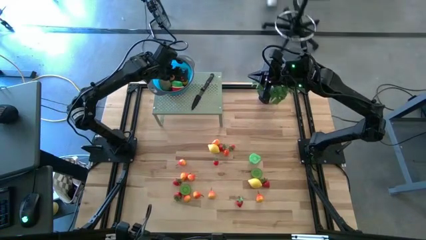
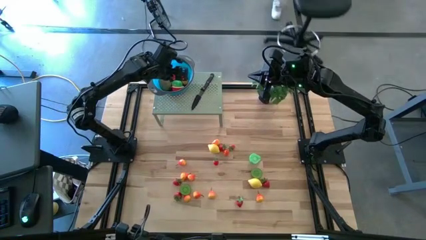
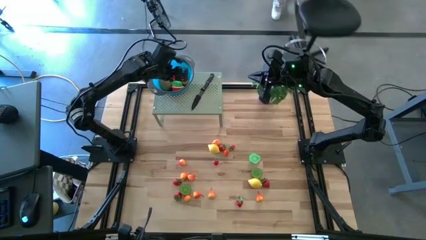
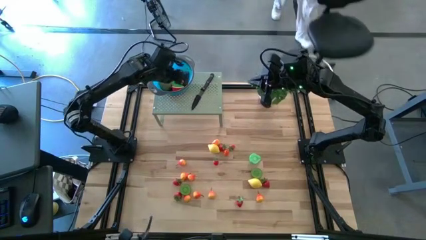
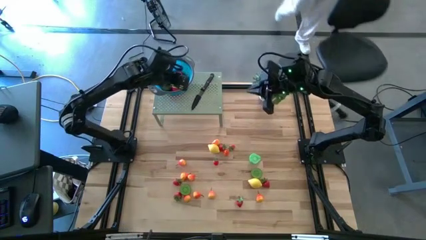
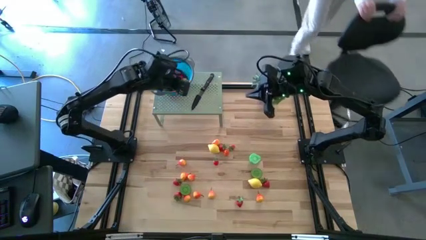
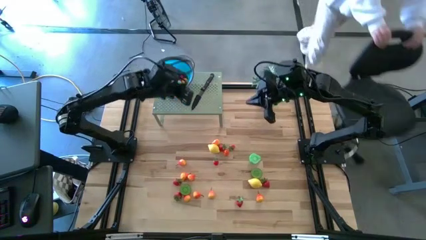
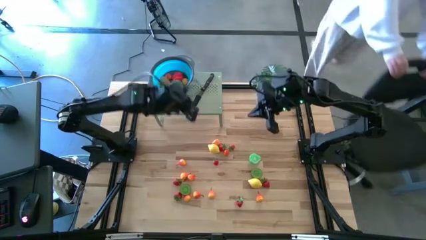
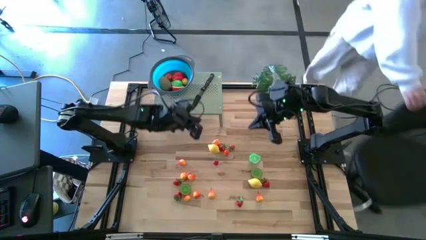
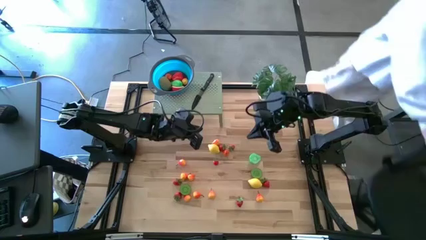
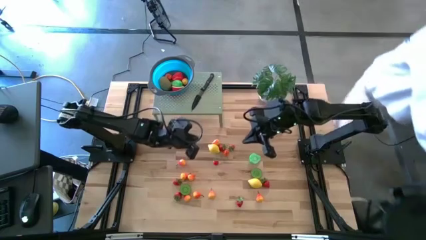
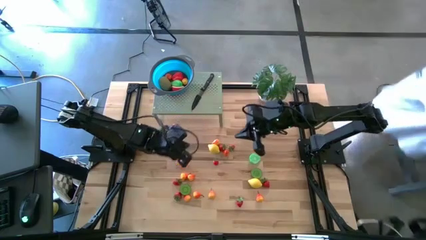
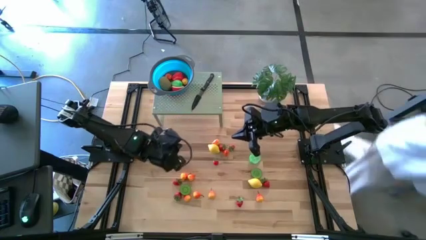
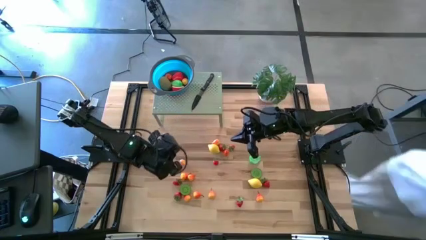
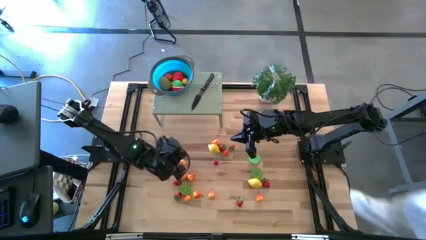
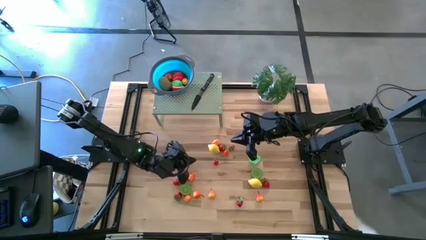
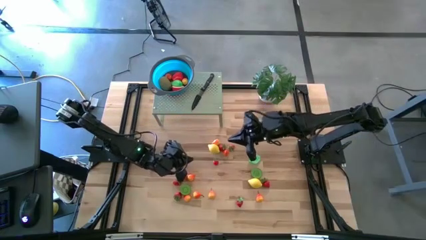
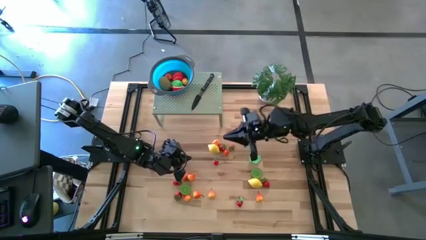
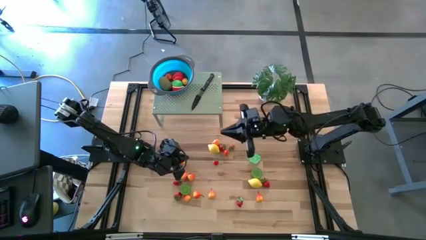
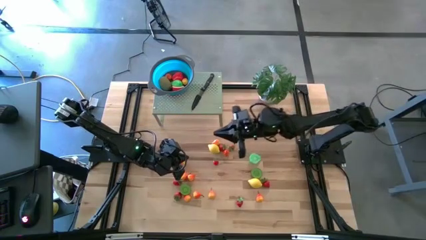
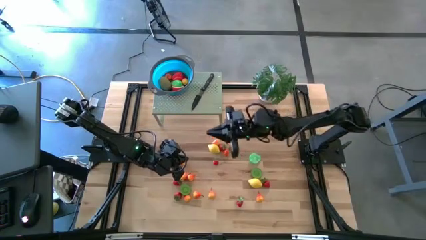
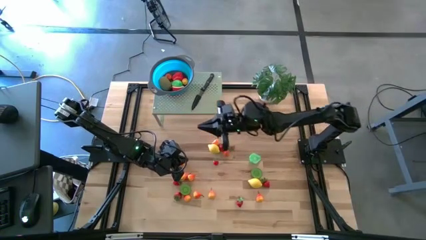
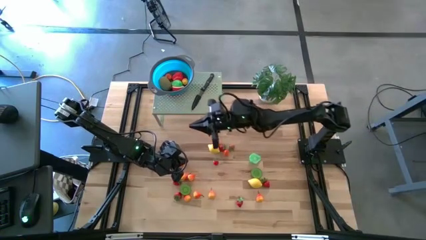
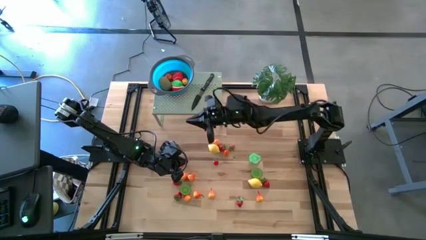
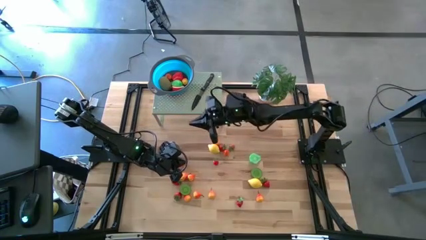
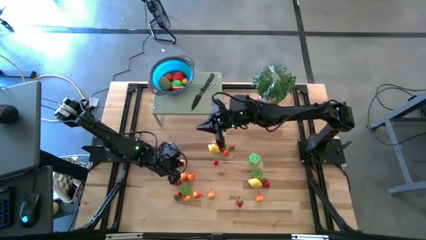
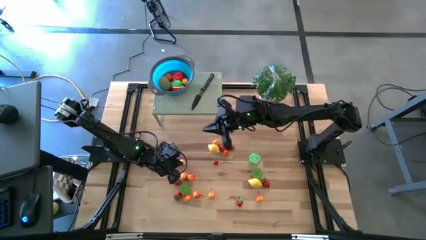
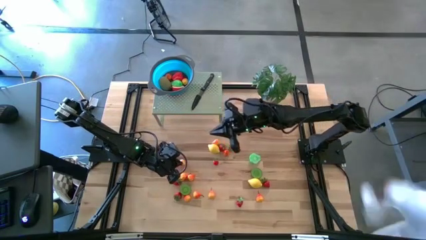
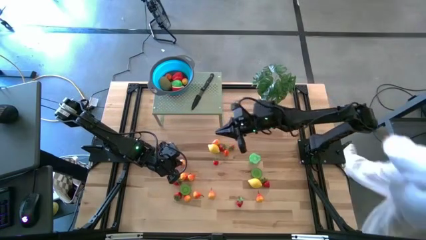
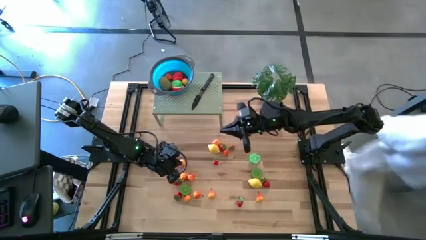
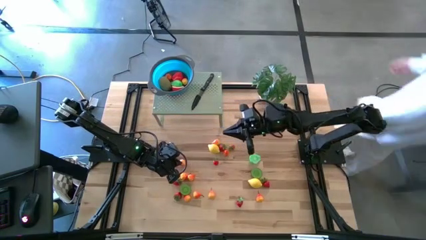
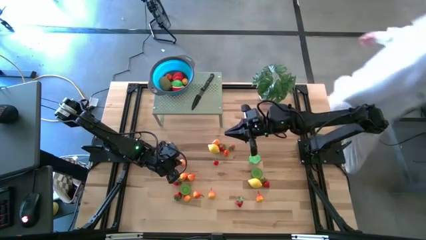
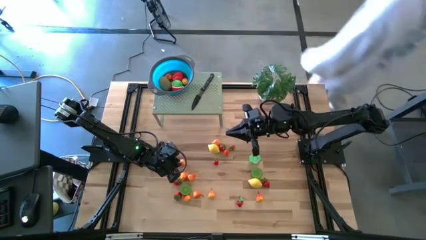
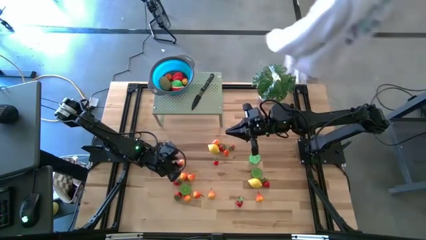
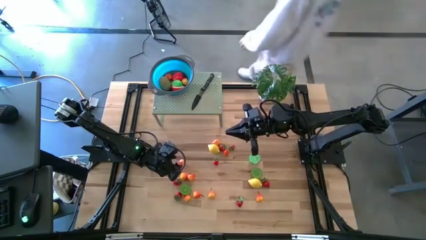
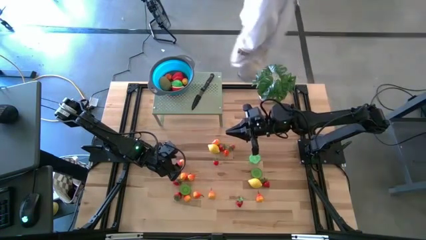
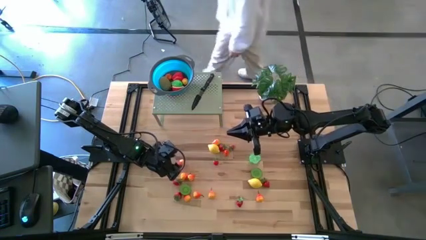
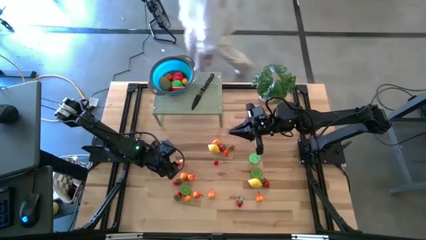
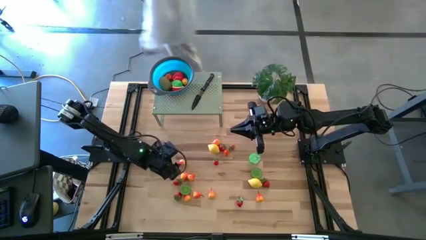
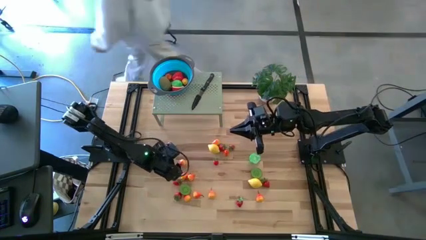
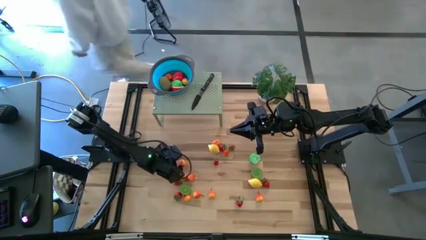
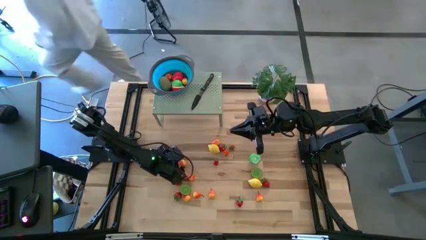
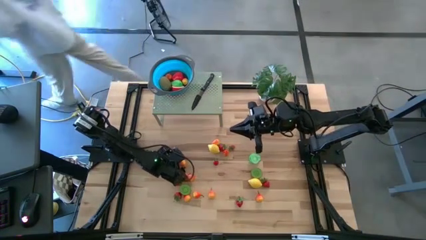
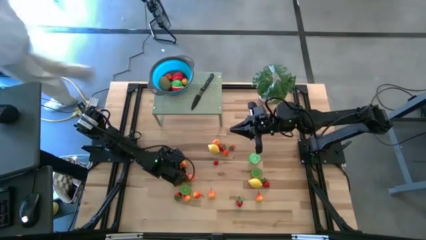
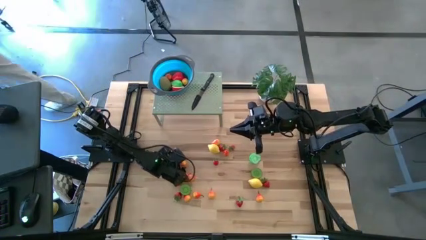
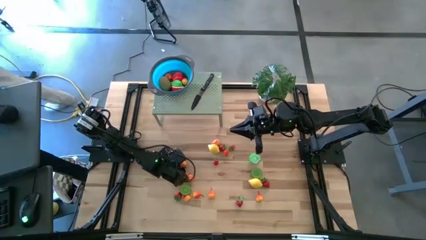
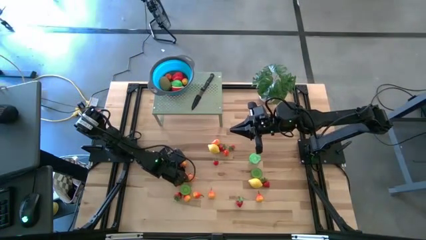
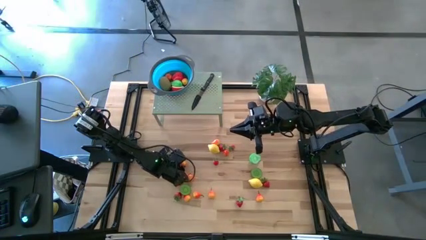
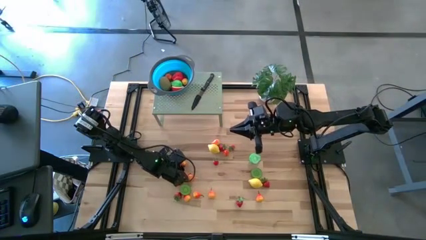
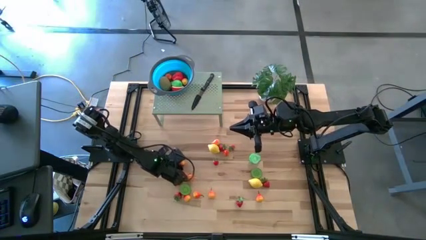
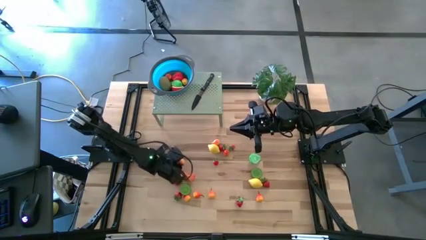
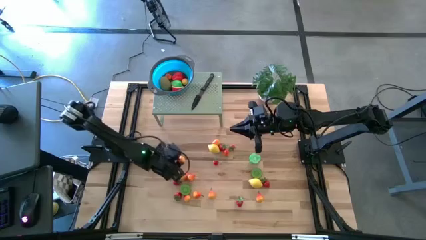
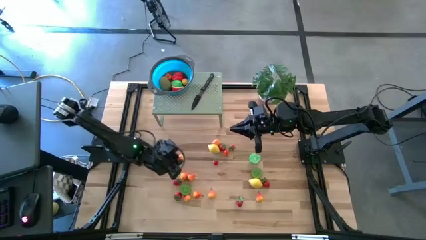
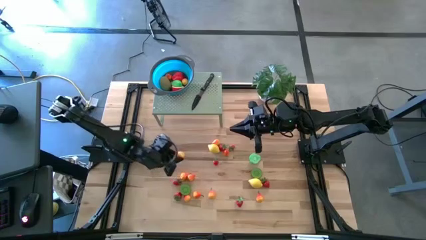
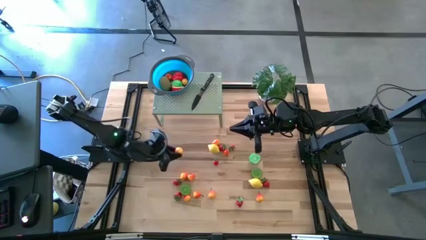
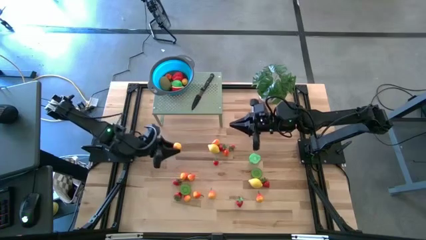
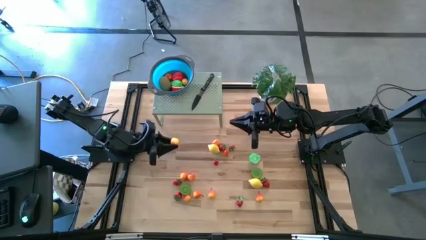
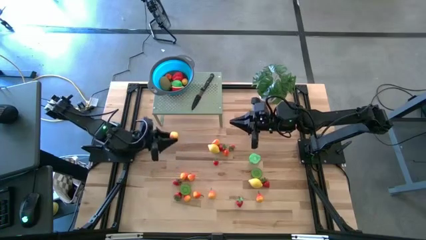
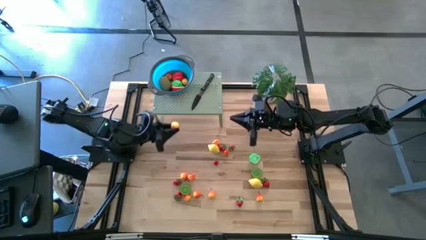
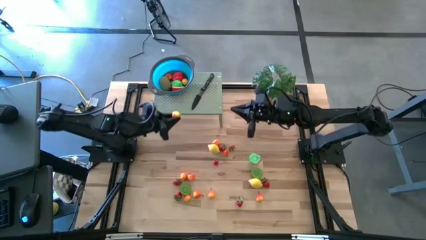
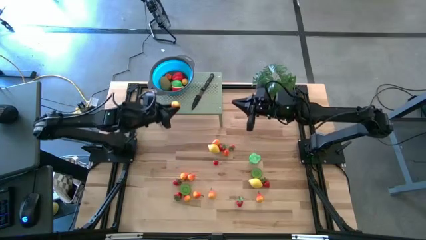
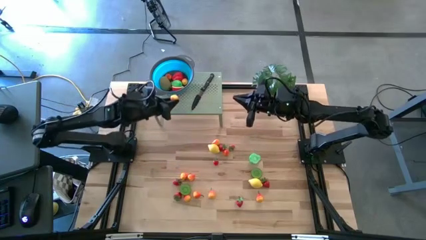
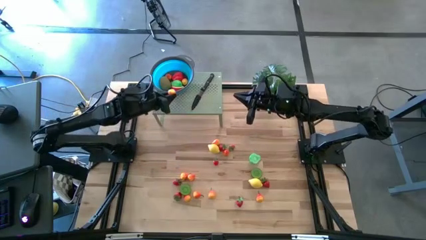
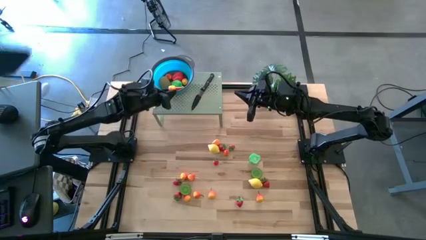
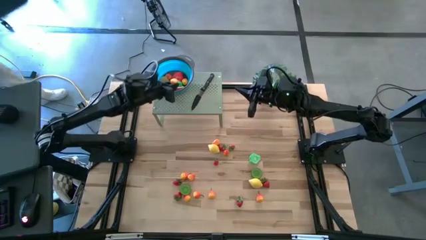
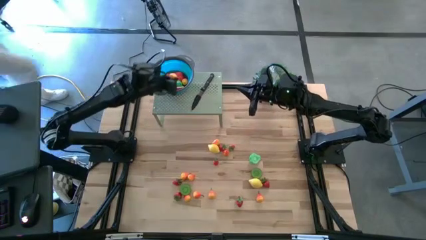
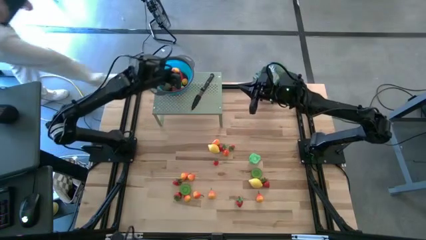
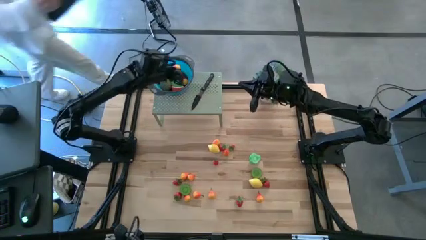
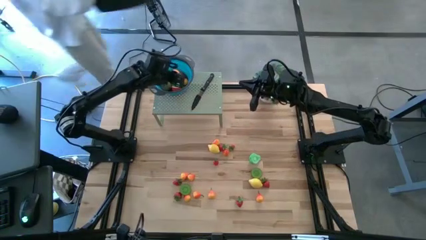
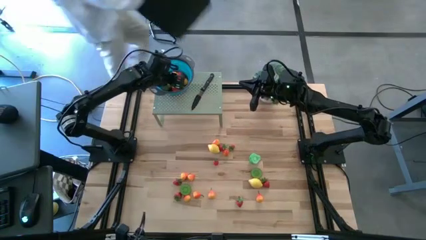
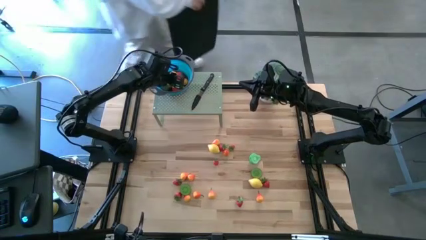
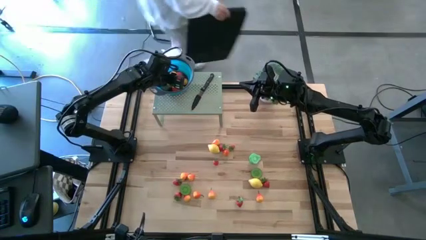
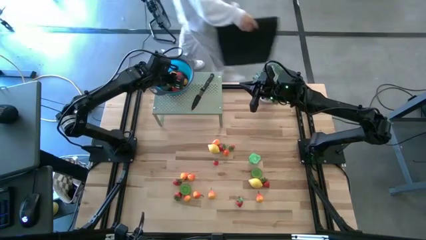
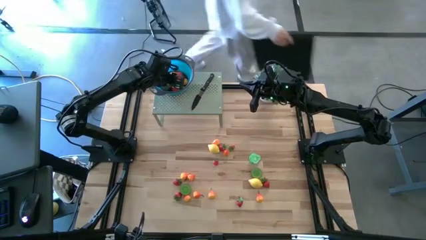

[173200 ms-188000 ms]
Task: Pick & Place Fruit
Put the orange pear into the strainer bowl on the shelf

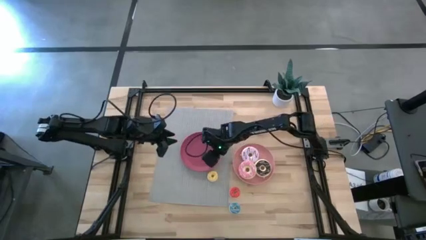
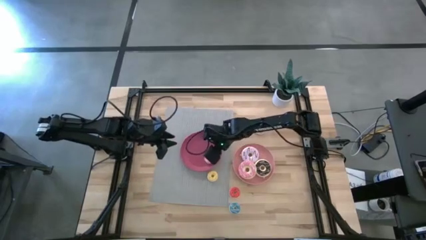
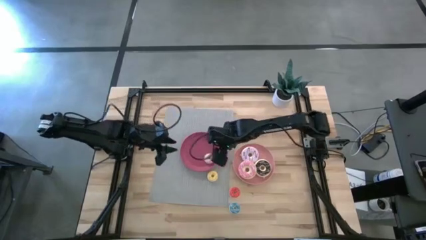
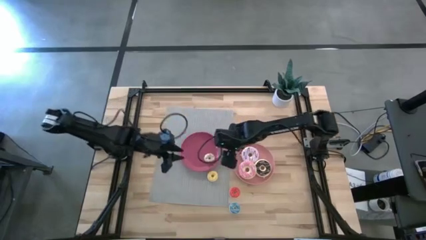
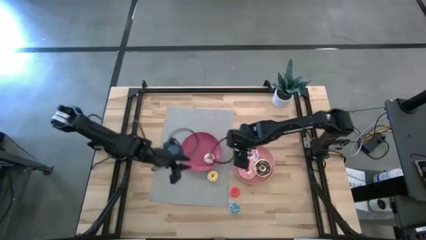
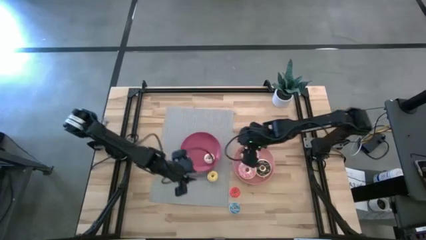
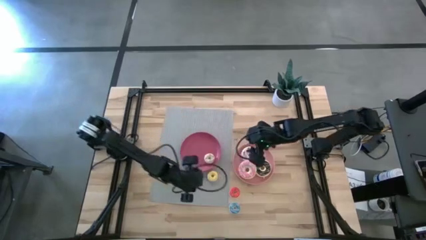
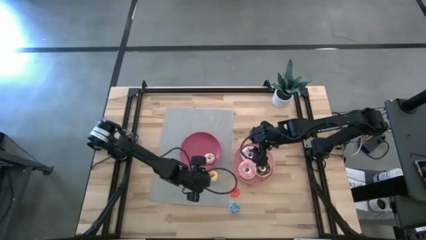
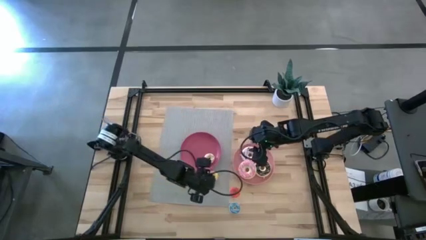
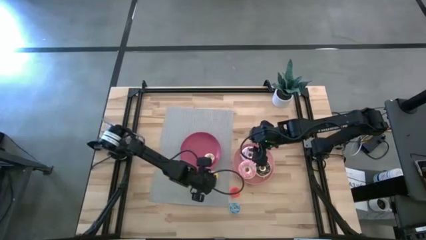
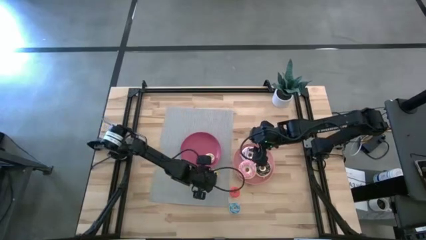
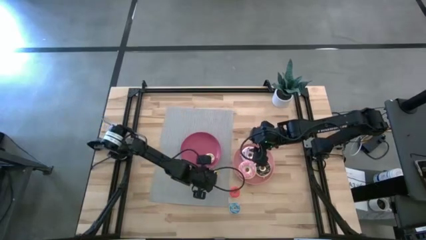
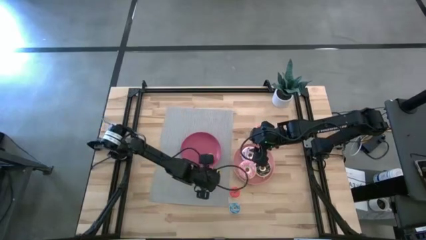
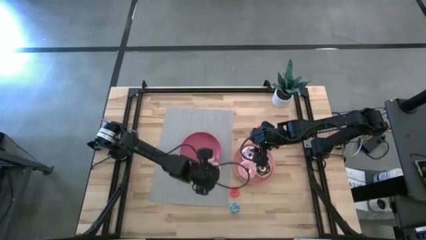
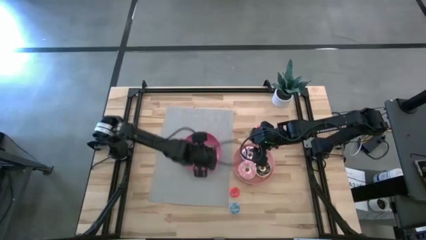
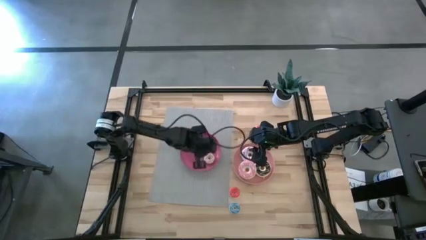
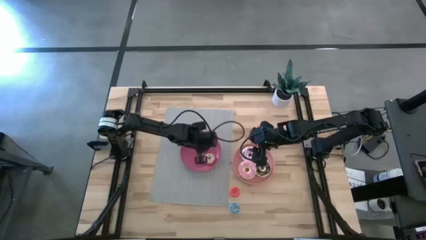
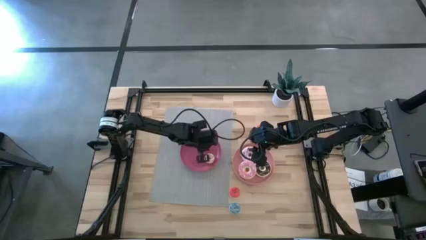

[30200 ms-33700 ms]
Task: Pick & Place donuts
Put the small yellow donut into the pink plate
